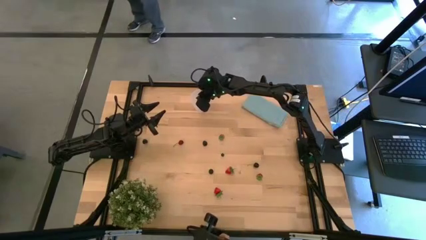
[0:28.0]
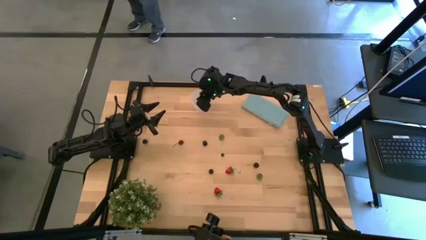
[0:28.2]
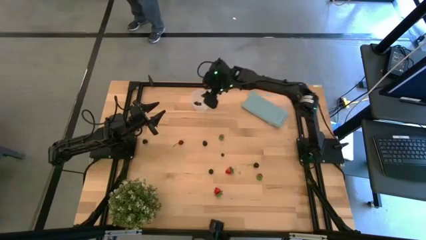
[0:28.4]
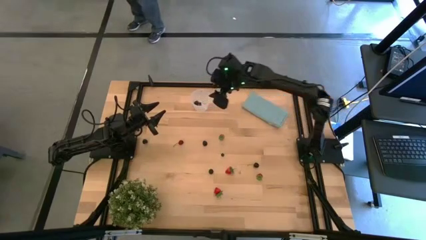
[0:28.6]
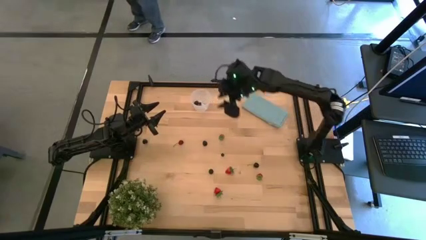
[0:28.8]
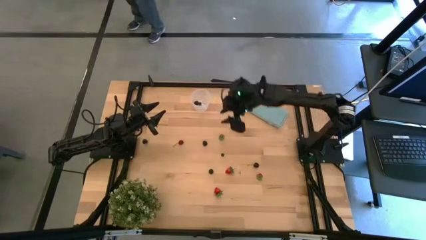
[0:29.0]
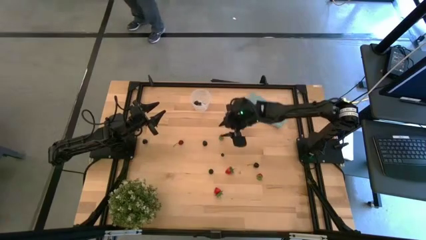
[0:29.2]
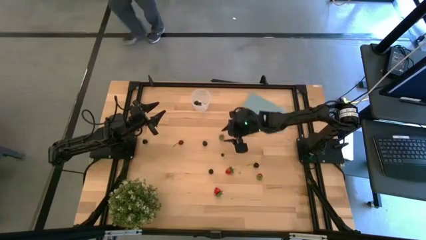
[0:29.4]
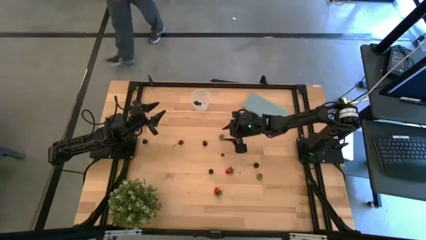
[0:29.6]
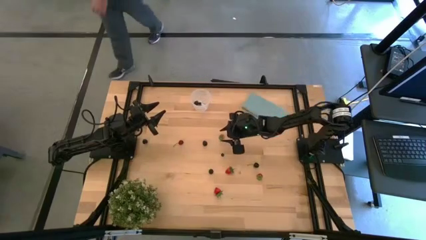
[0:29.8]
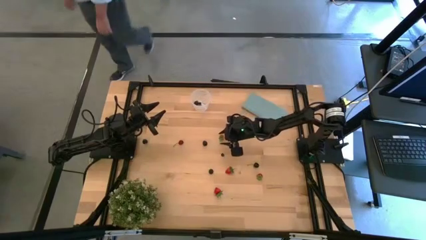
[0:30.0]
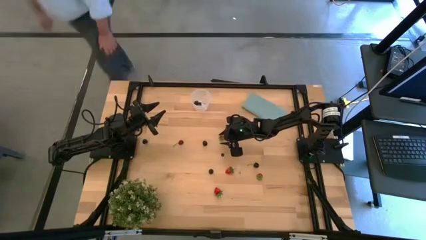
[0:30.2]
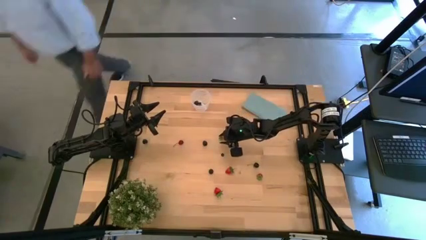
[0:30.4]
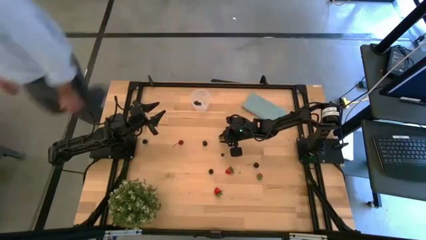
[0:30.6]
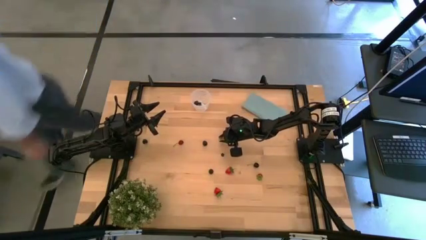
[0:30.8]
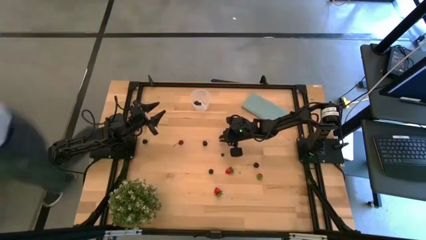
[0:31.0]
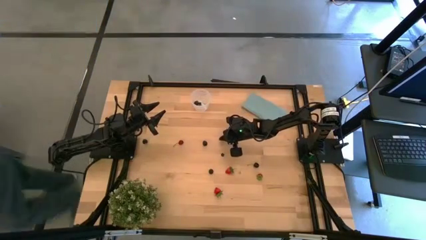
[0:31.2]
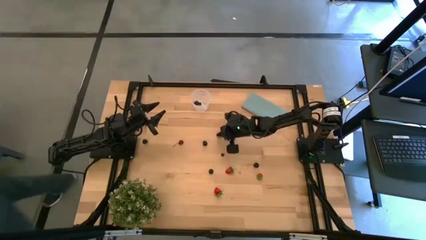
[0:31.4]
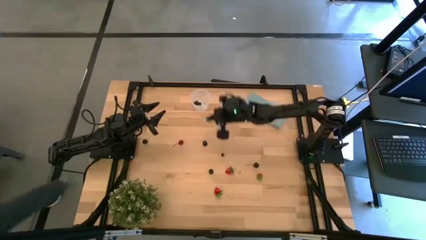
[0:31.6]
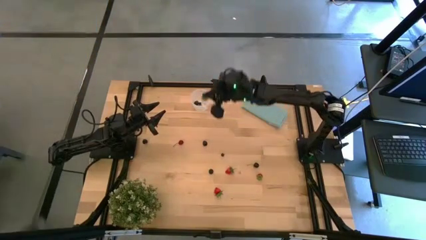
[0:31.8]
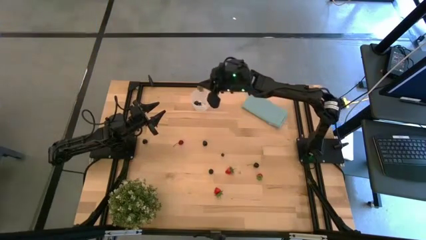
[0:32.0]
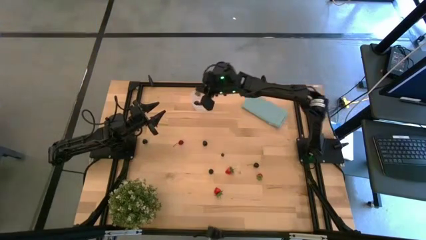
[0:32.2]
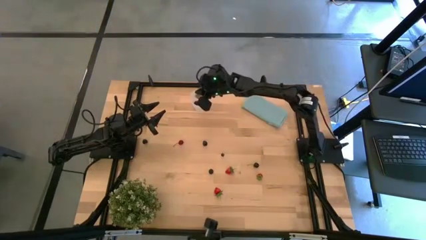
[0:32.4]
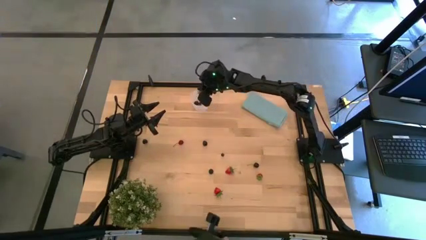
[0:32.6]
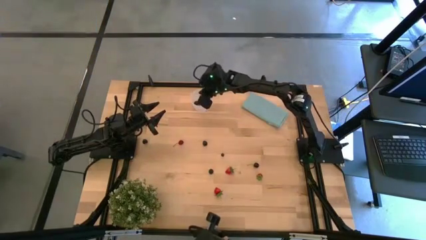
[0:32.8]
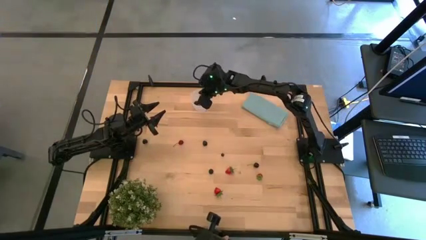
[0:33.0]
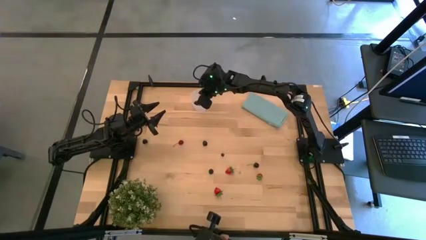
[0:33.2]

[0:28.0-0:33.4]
Task: Pick and placing Produce into tupperware
Put the top red strawberry into the transparent container

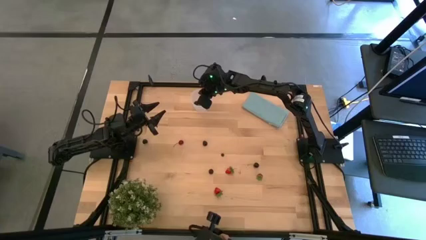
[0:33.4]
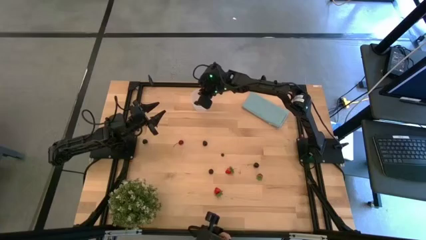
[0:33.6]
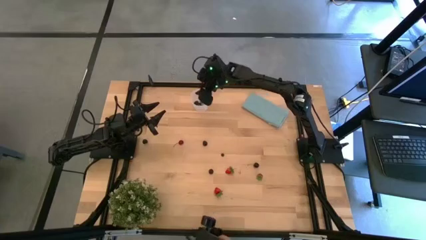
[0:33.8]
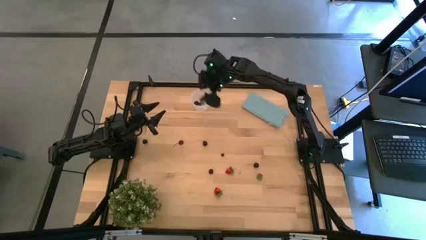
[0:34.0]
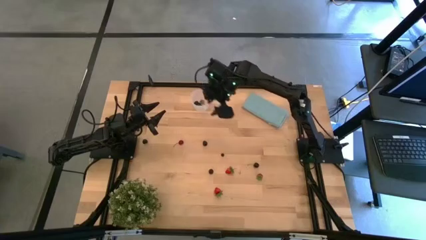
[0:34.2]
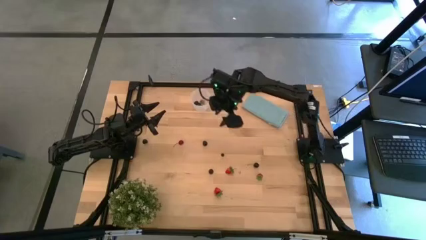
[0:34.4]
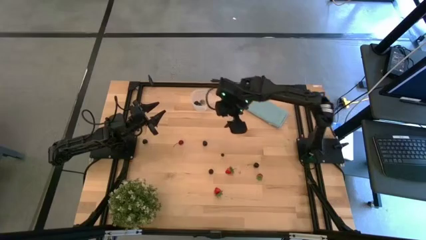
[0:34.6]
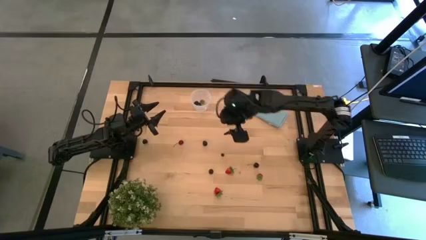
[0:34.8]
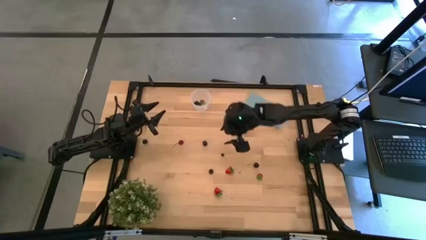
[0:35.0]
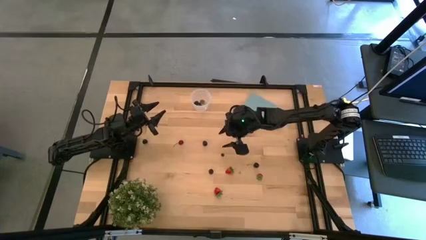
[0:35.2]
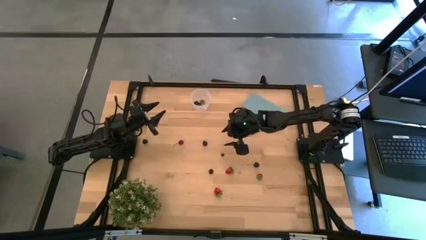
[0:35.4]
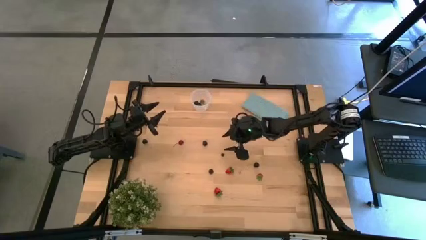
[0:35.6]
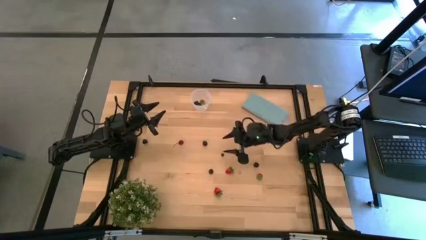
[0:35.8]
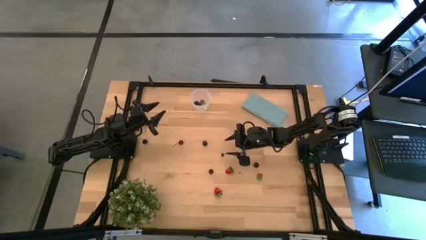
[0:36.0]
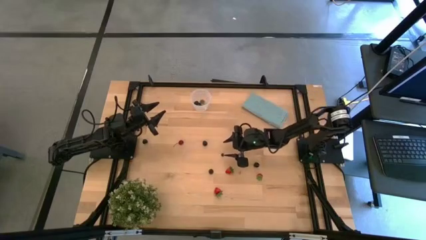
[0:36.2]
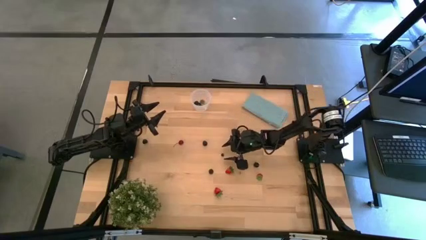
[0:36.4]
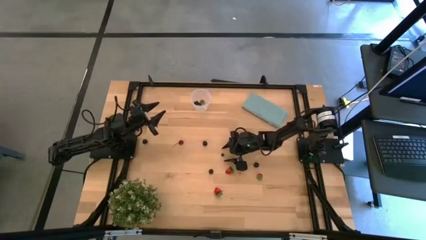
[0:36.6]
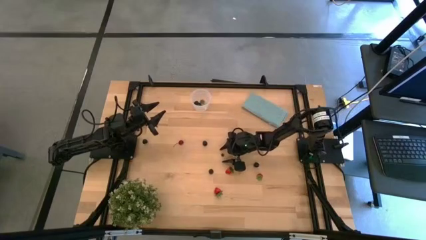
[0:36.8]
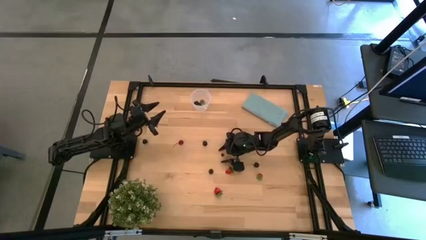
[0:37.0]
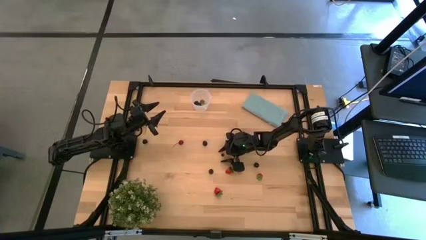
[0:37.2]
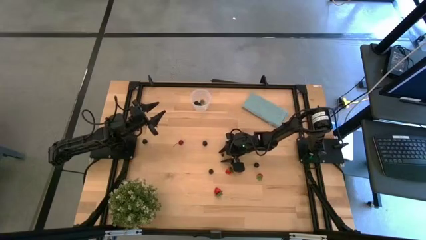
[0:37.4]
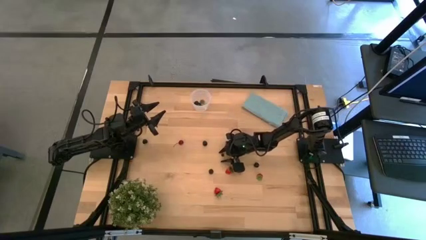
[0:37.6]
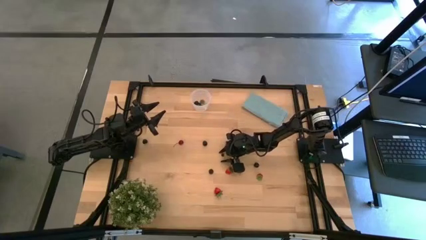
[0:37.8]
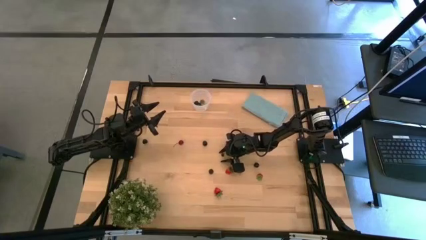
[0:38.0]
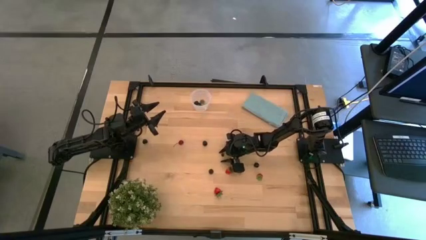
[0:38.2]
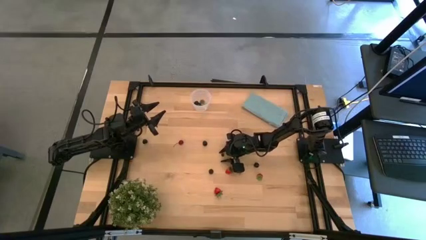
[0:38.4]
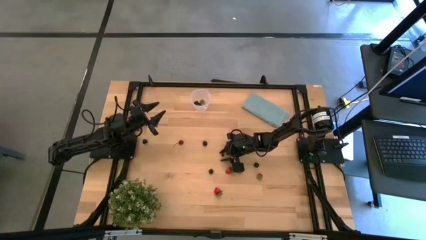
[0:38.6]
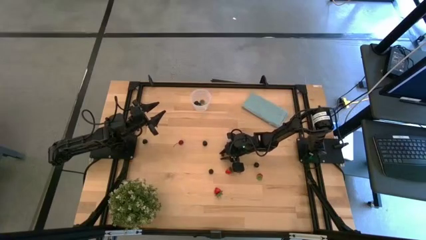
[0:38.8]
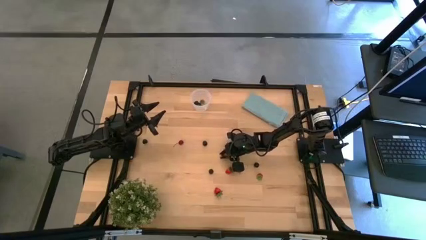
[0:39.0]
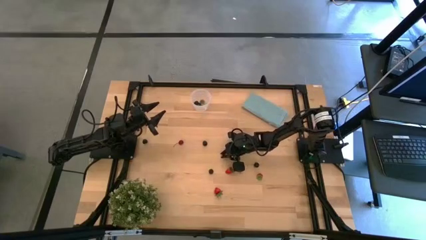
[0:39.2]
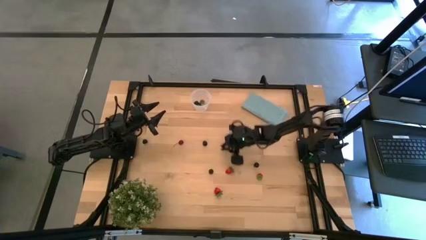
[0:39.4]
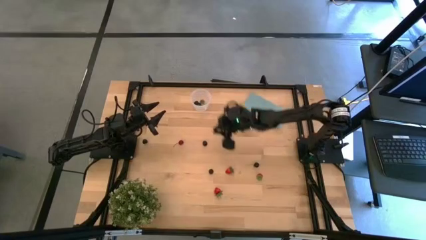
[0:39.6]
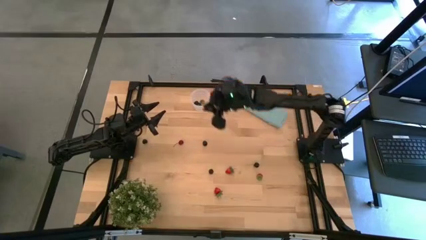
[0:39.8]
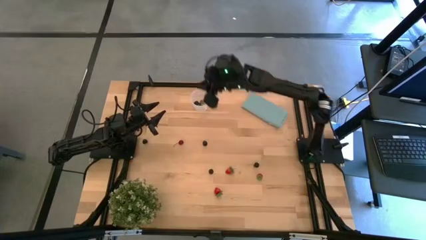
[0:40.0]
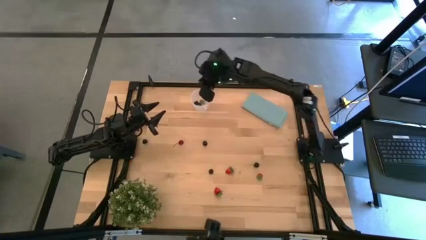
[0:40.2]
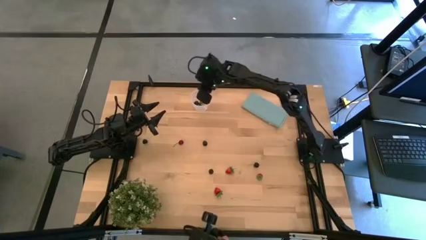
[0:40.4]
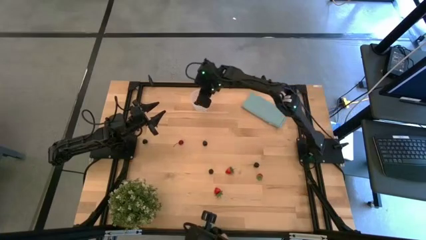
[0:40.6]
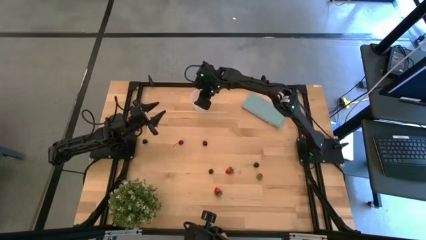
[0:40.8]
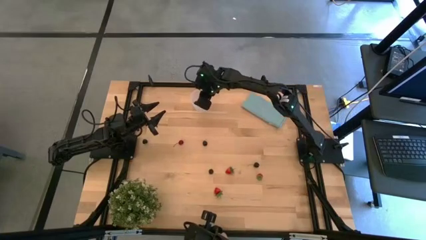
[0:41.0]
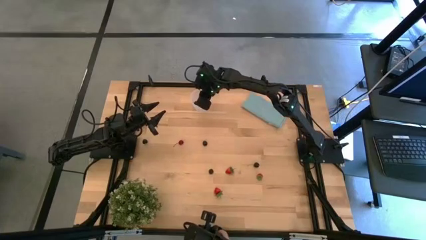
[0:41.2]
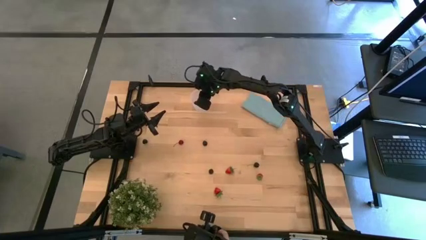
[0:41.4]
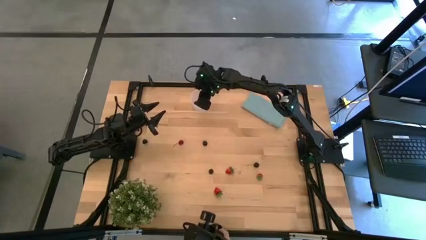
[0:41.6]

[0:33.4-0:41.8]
Put the blueberry into the transparent container
